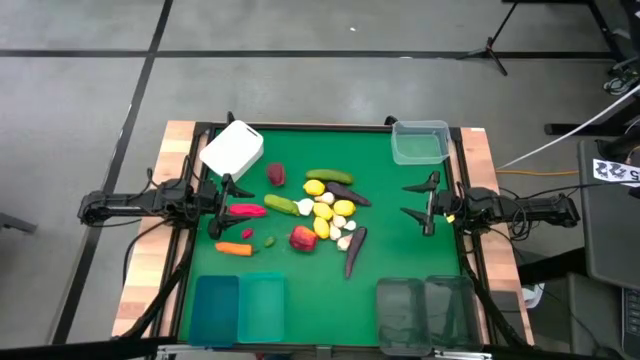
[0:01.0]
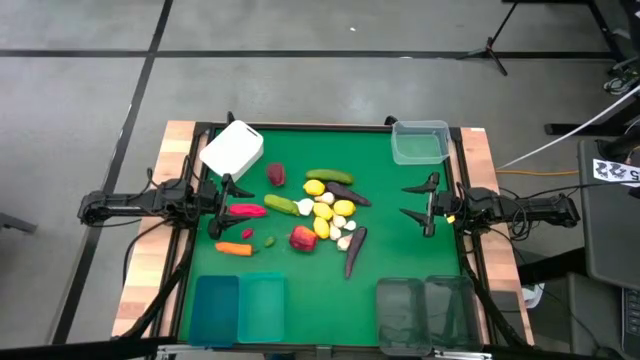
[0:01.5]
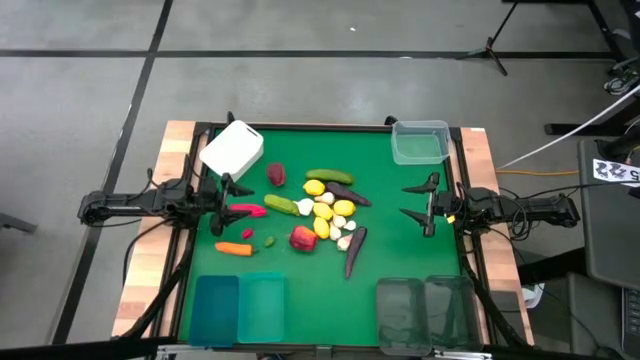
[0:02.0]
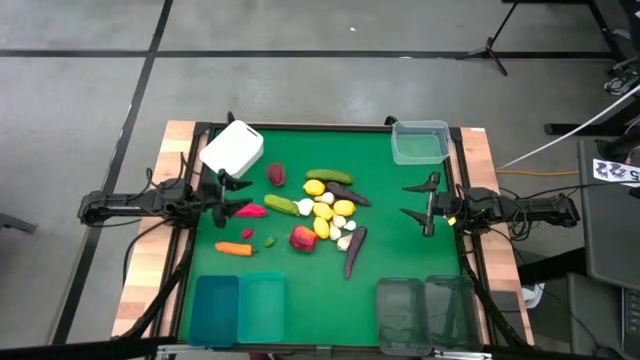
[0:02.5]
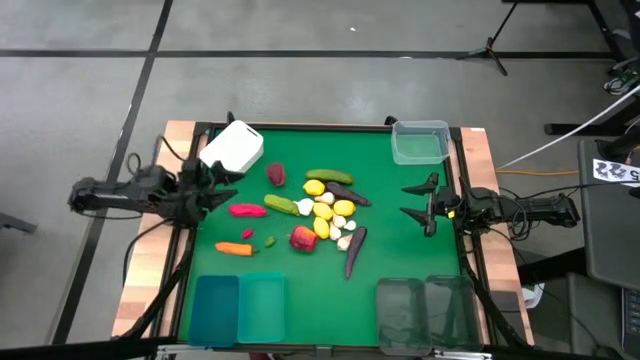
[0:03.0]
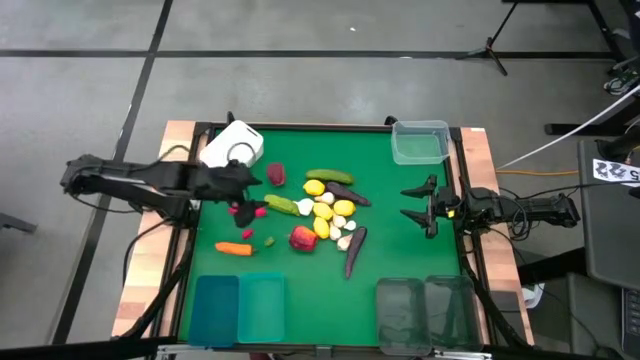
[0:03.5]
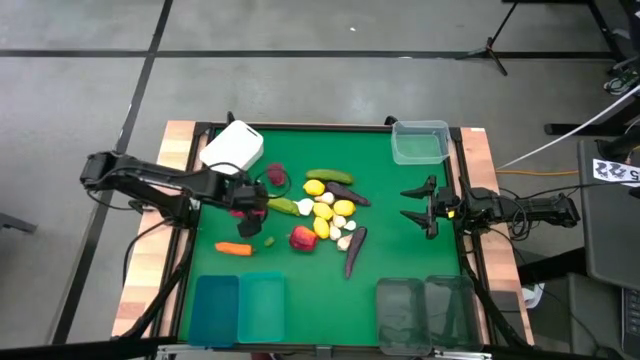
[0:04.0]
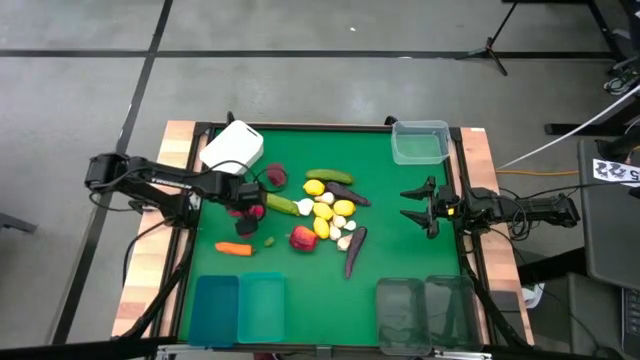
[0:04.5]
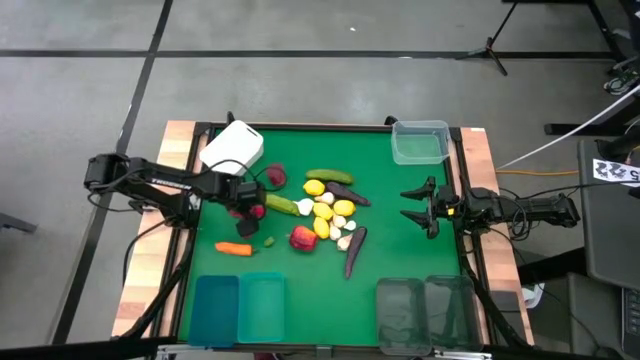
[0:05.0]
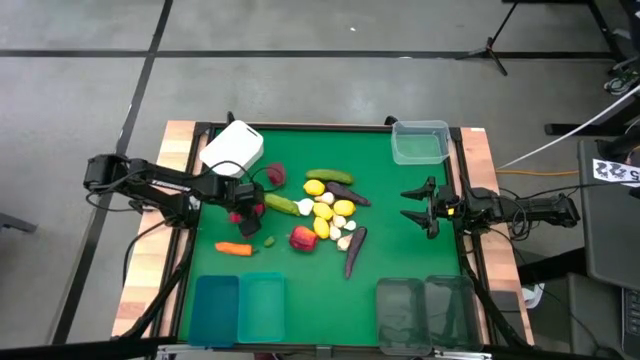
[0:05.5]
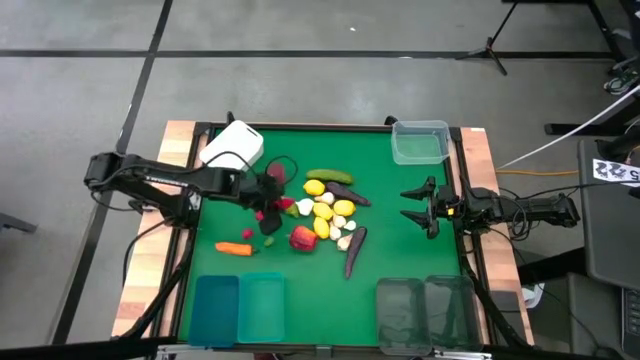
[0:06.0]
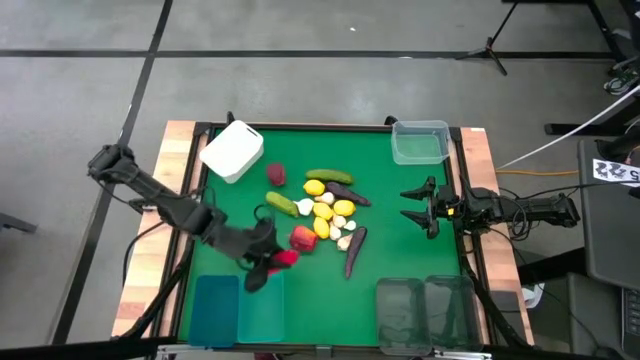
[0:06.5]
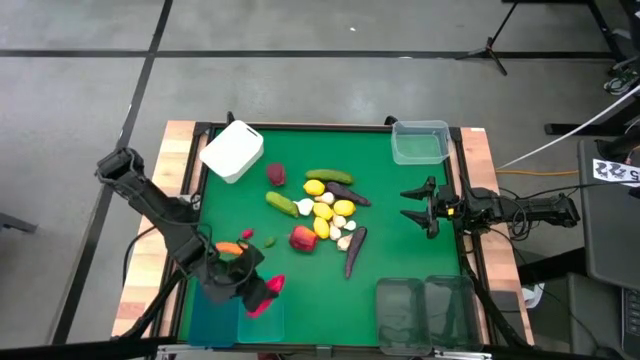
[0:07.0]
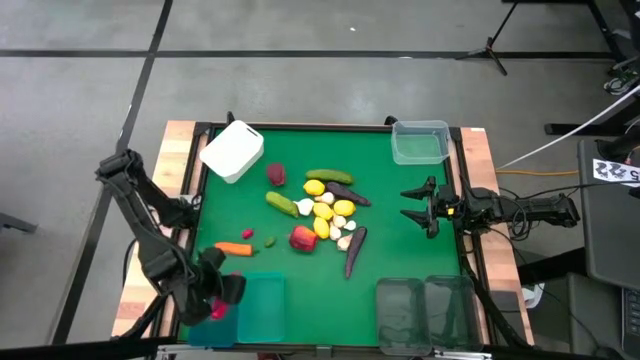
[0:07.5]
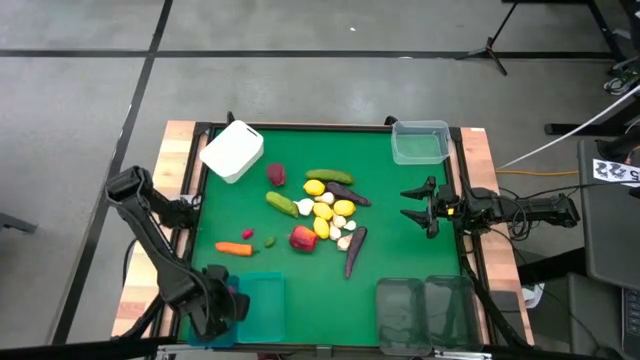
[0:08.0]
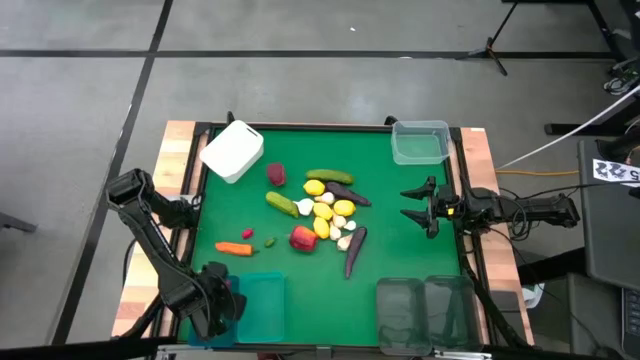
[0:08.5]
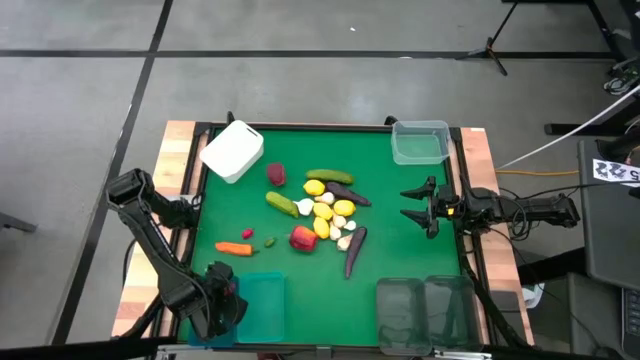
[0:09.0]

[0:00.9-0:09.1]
Task: Sort produce into baskets
Put the big red pepper into the dark blue bin

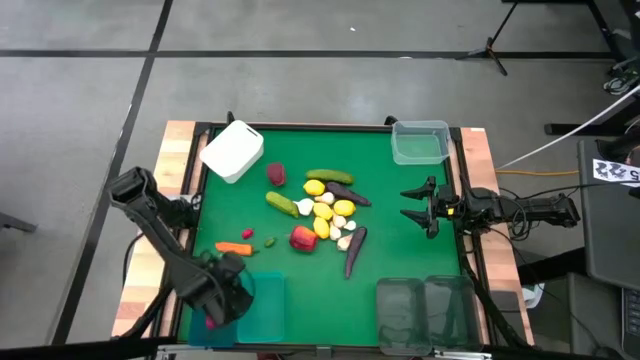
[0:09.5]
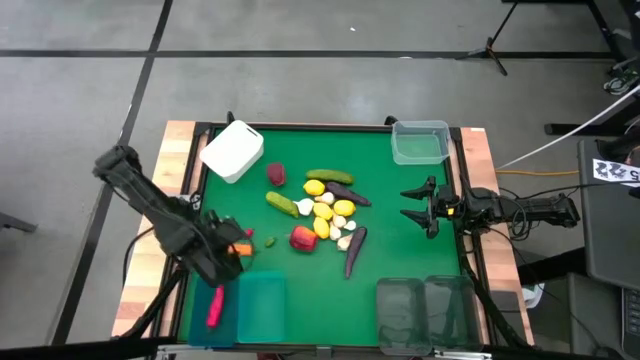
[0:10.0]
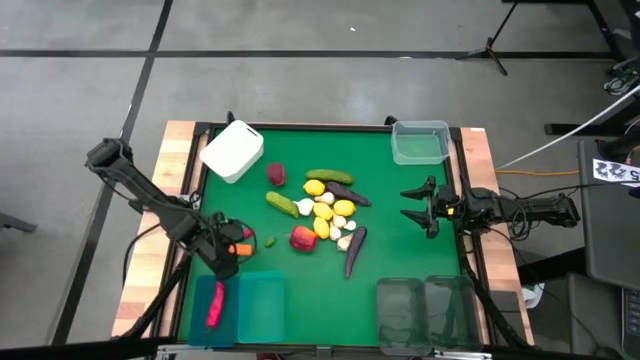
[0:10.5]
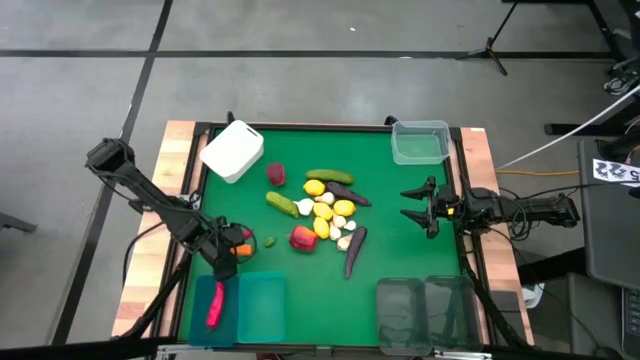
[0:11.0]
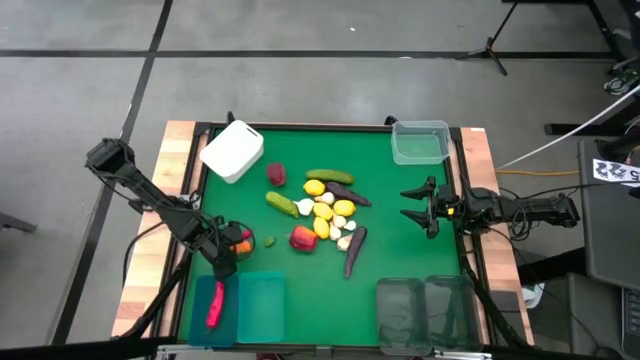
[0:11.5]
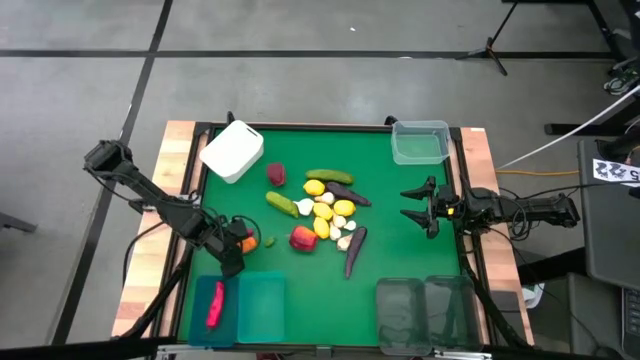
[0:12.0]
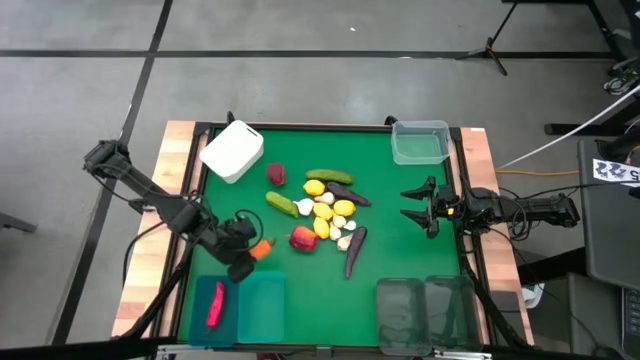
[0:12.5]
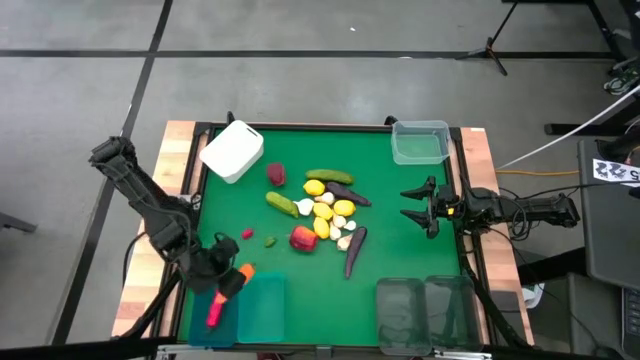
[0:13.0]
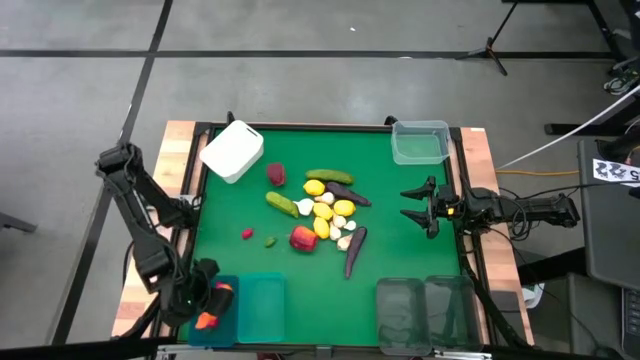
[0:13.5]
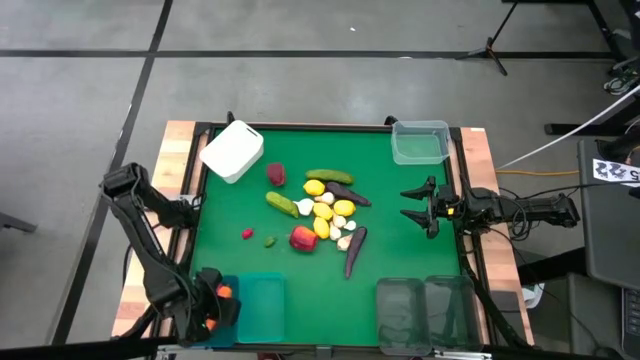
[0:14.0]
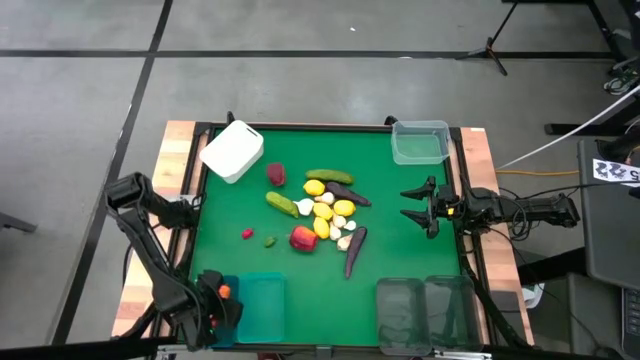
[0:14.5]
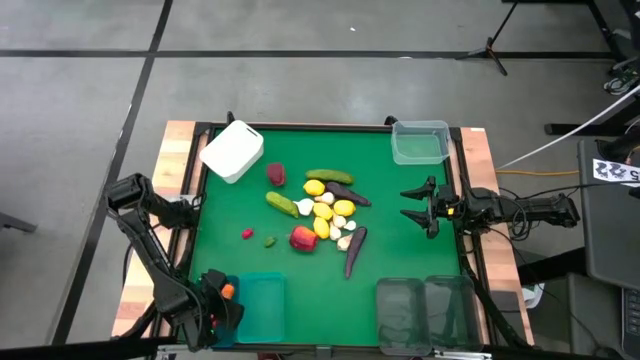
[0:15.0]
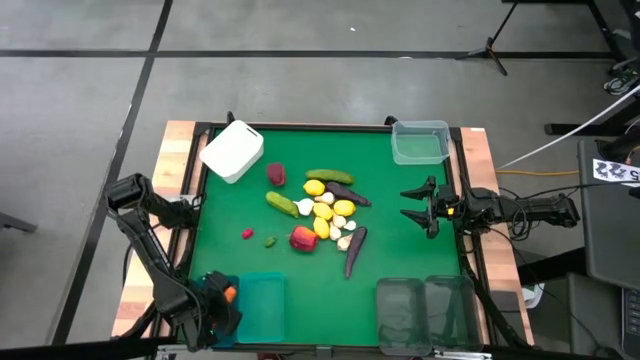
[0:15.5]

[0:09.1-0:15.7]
Put the big orange pepper into the dark blue bin

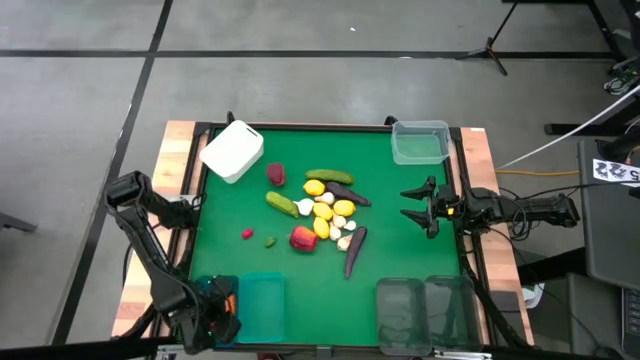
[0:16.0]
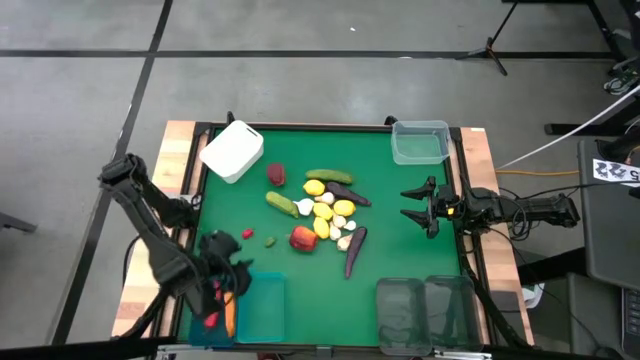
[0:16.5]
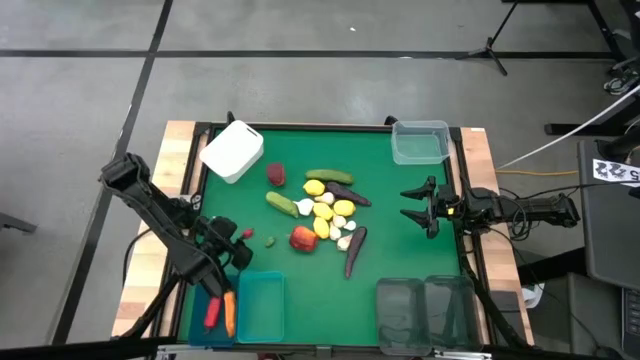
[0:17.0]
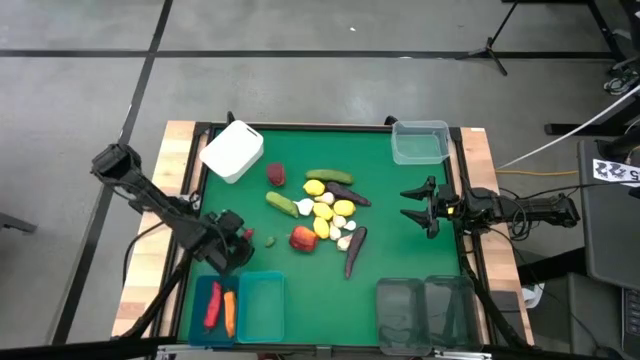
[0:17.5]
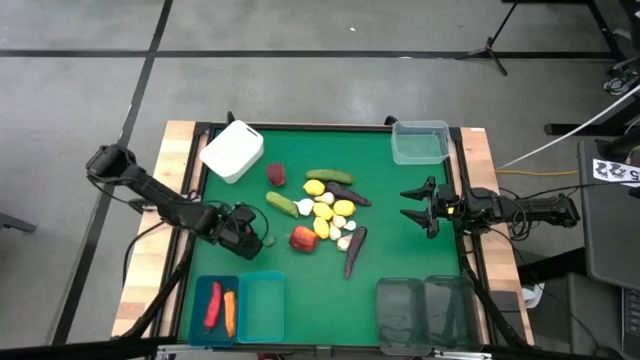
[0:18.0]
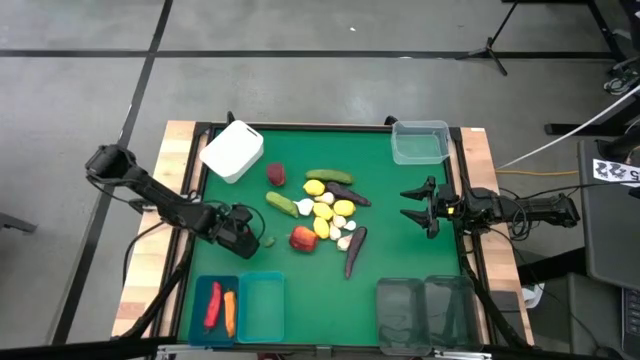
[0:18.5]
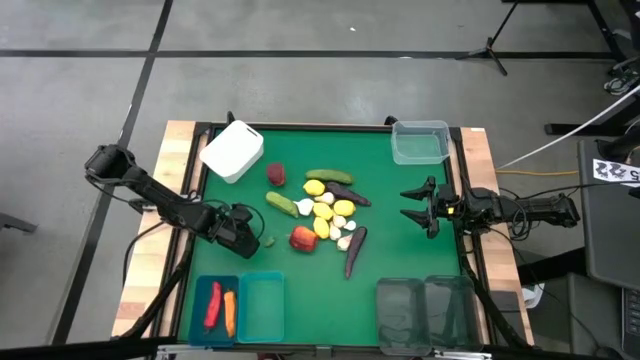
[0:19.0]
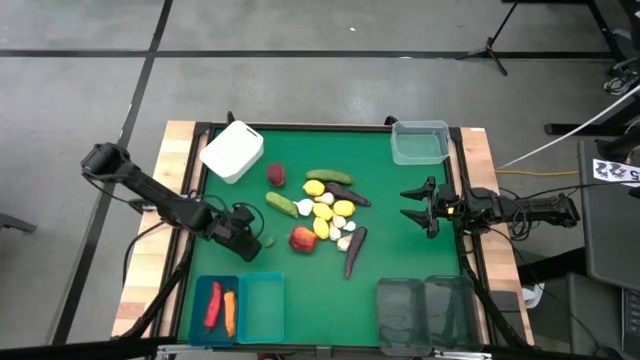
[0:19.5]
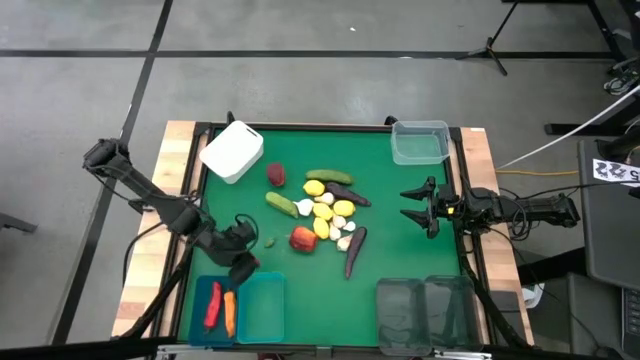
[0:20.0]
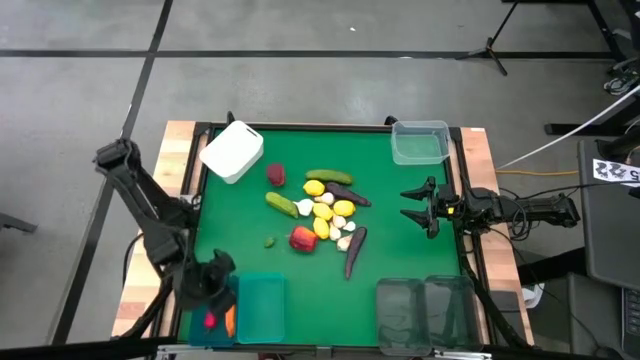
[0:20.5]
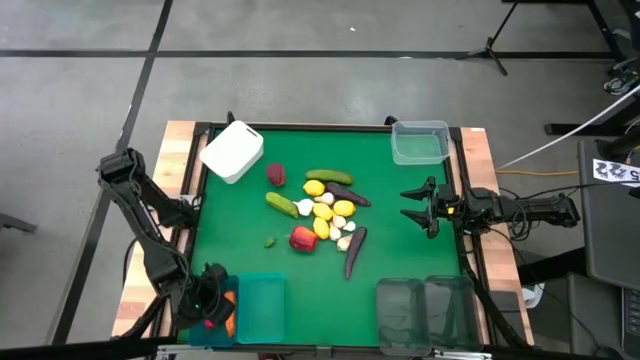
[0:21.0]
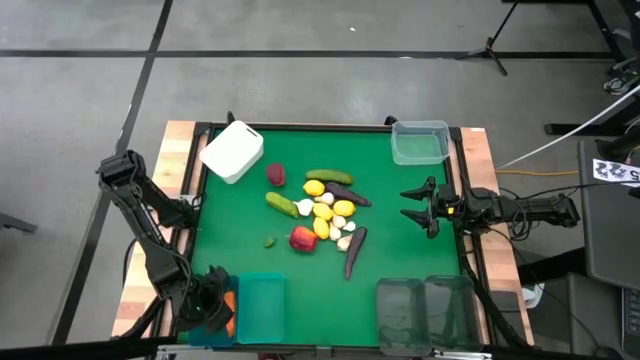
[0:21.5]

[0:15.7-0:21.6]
Put the small red pepper into the dark blue bin
